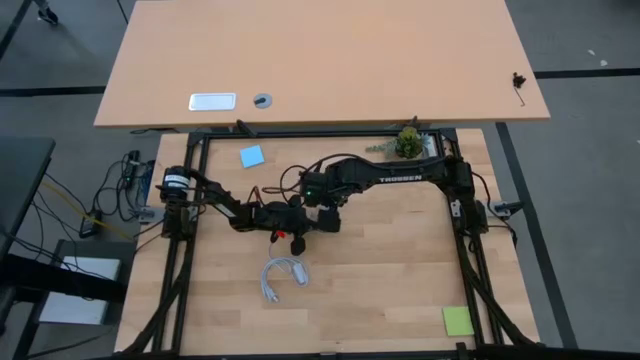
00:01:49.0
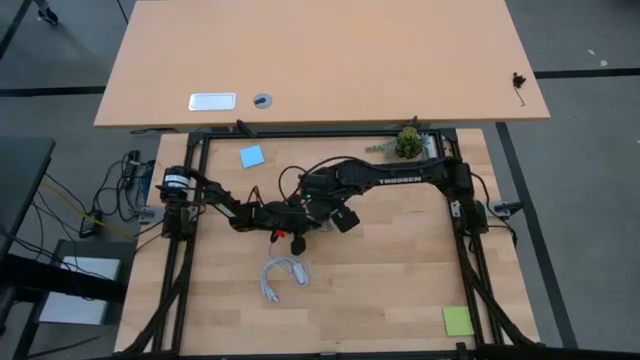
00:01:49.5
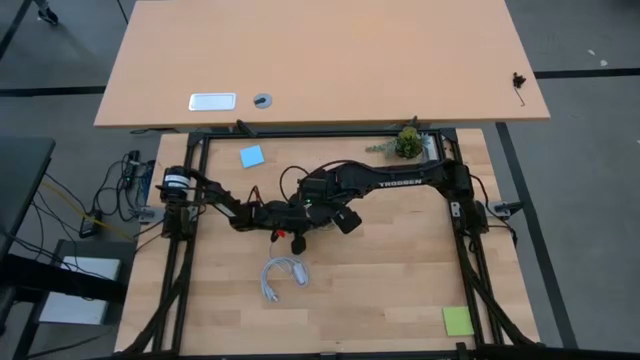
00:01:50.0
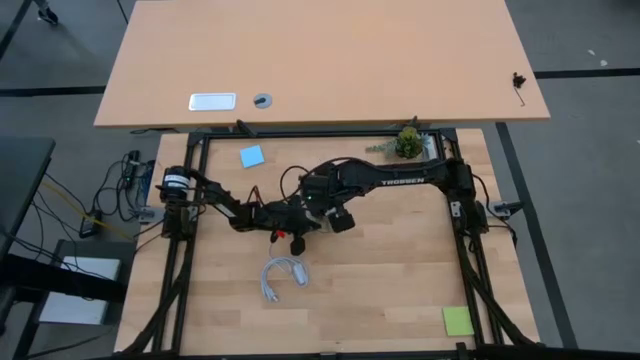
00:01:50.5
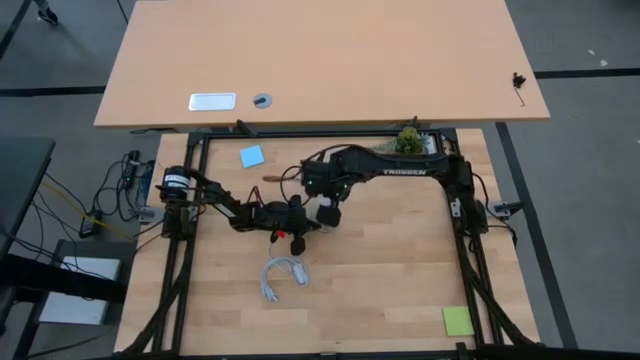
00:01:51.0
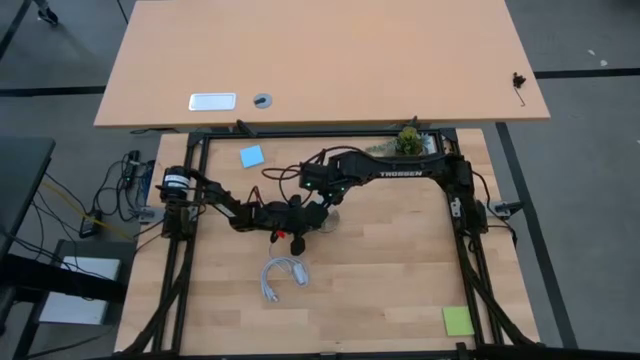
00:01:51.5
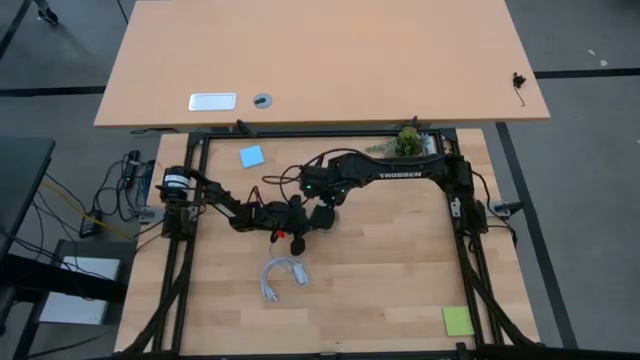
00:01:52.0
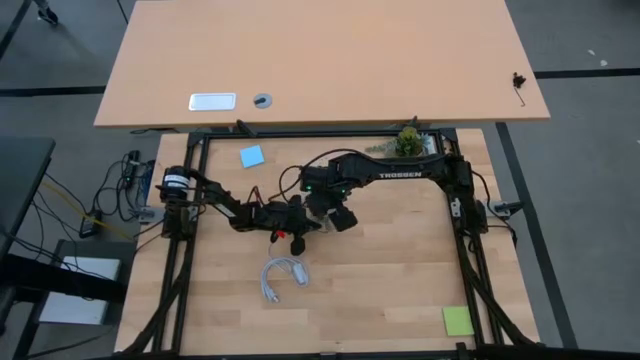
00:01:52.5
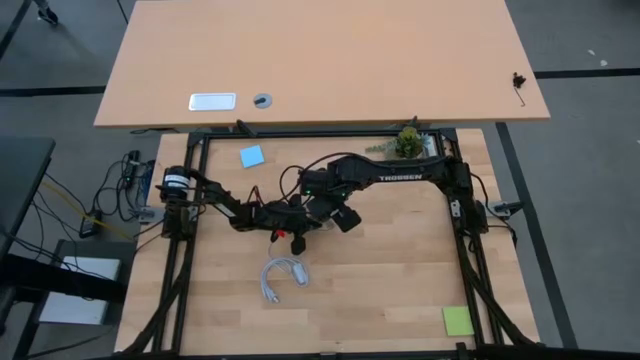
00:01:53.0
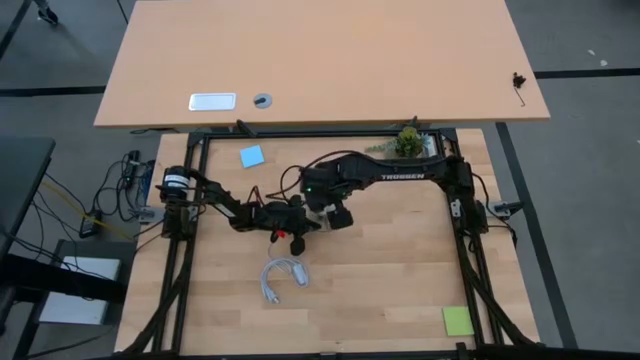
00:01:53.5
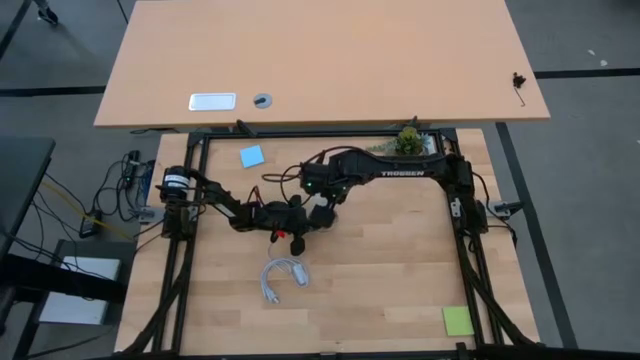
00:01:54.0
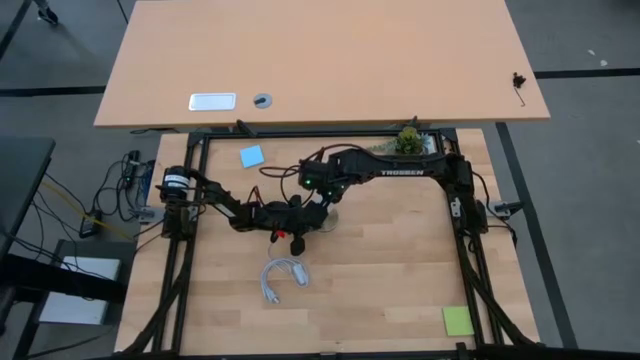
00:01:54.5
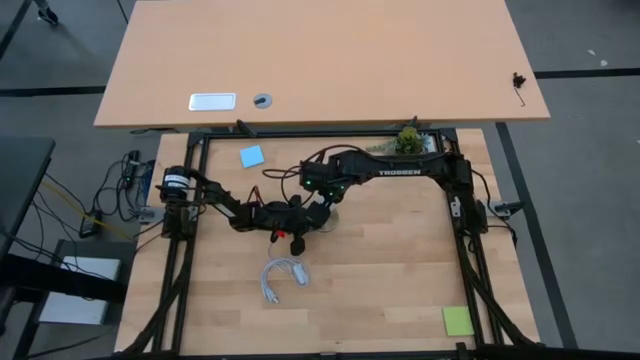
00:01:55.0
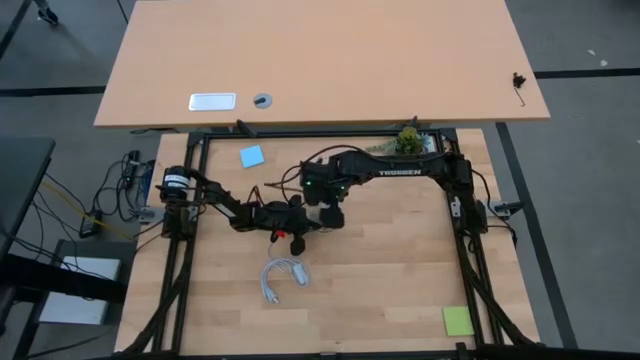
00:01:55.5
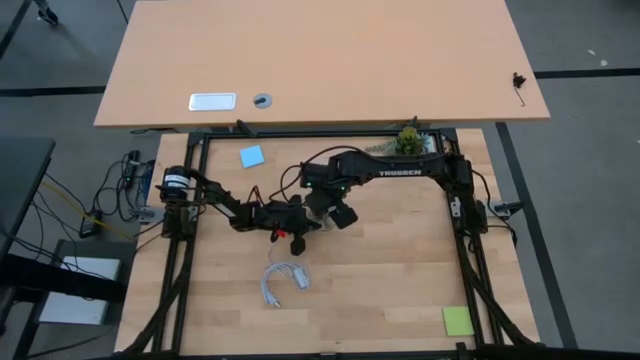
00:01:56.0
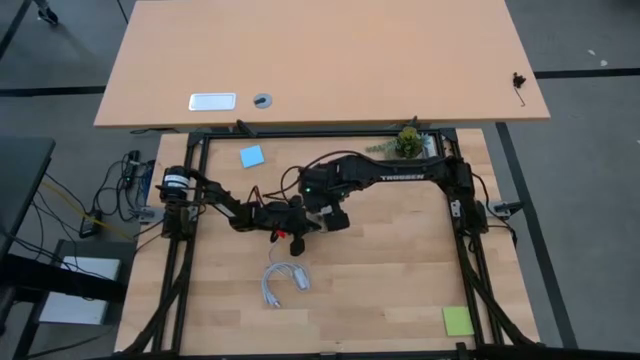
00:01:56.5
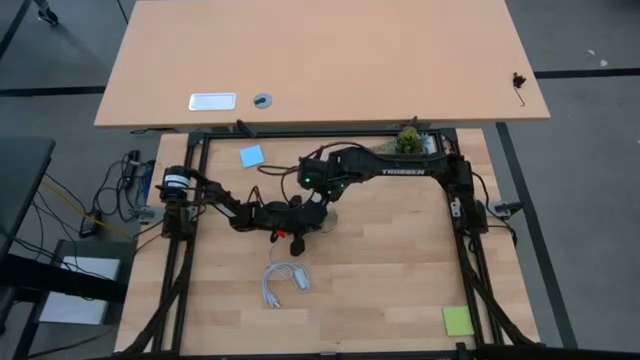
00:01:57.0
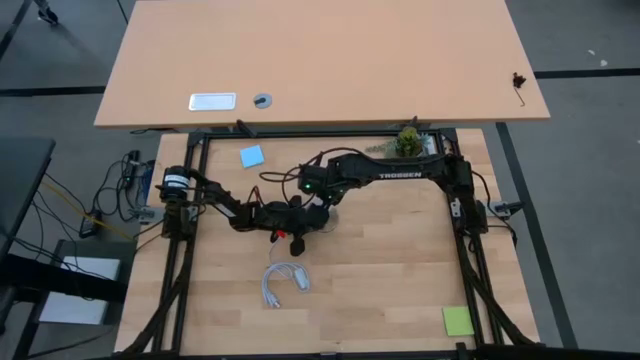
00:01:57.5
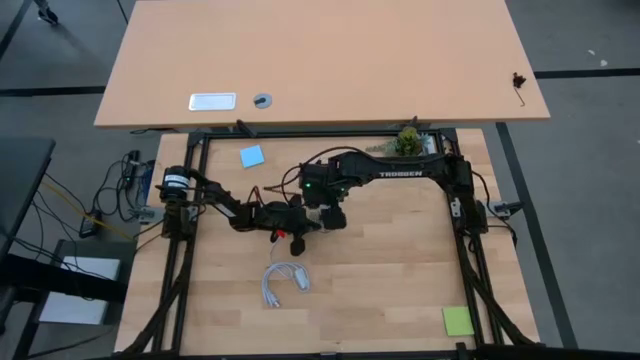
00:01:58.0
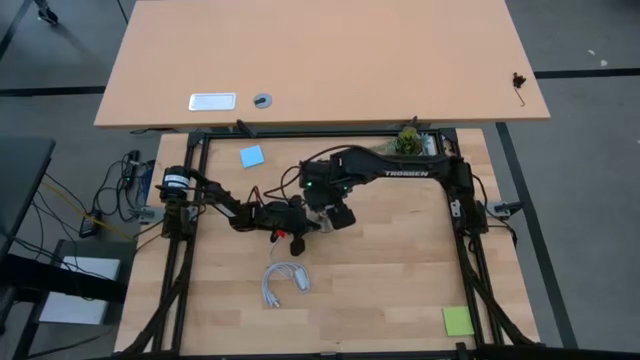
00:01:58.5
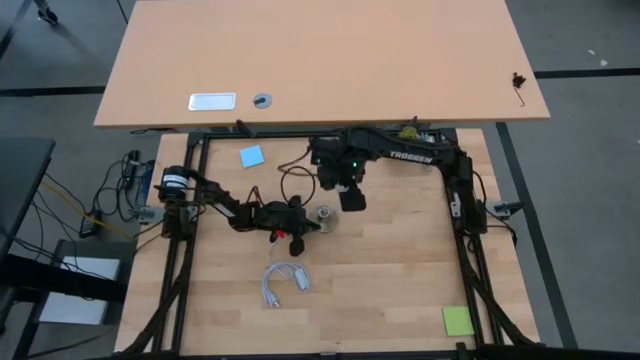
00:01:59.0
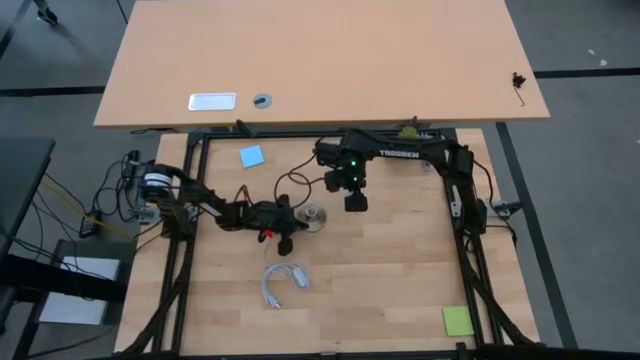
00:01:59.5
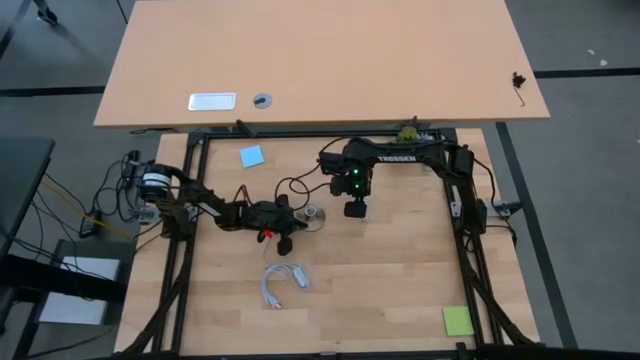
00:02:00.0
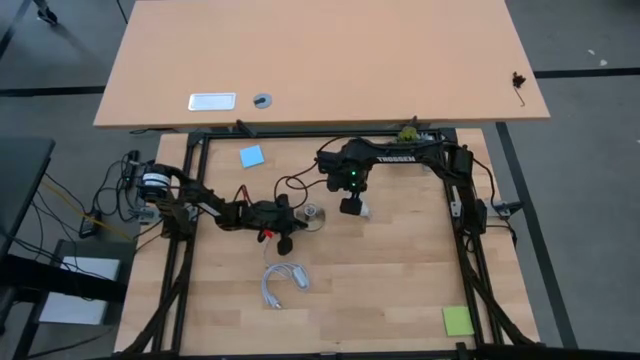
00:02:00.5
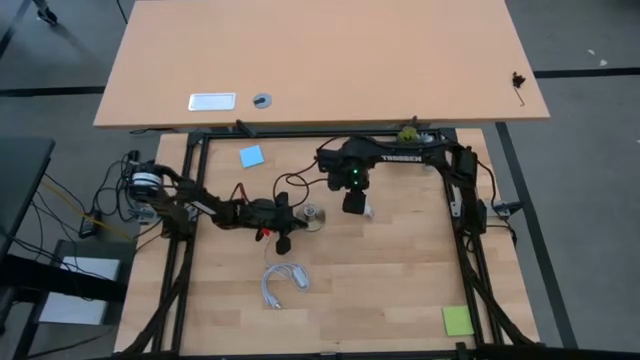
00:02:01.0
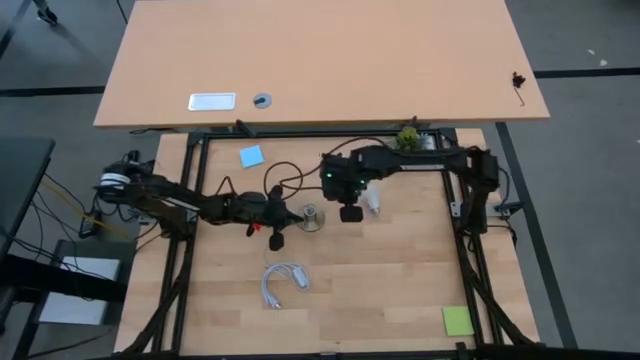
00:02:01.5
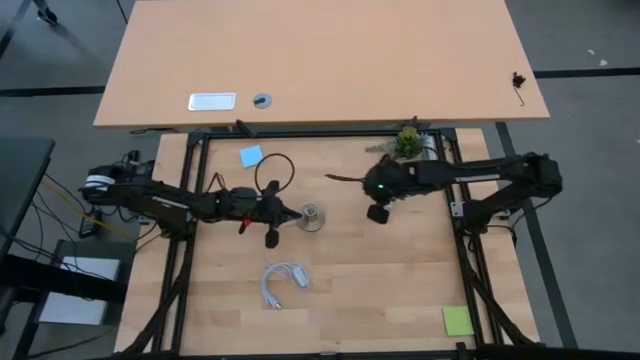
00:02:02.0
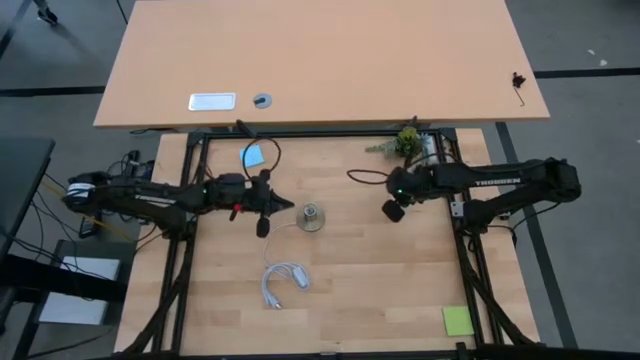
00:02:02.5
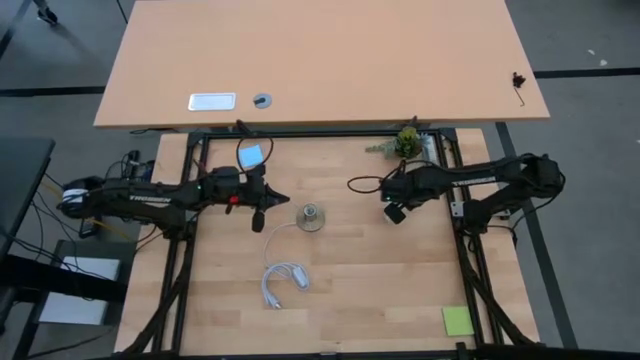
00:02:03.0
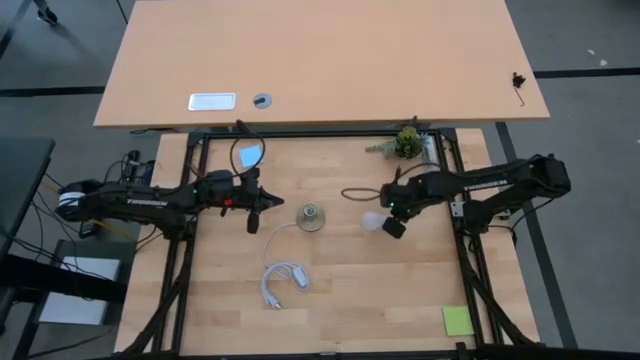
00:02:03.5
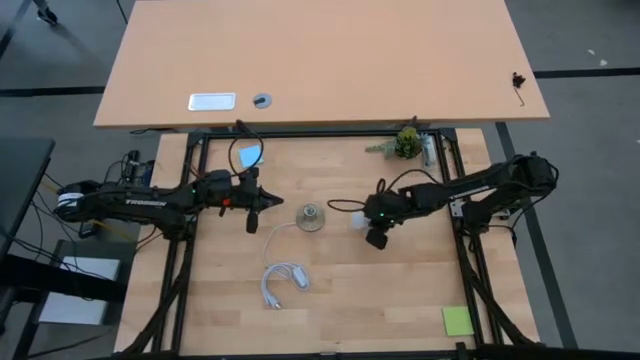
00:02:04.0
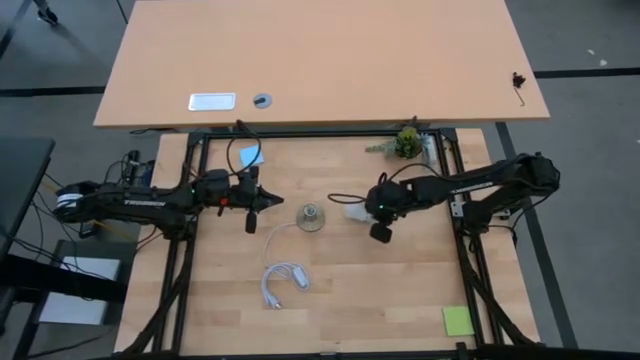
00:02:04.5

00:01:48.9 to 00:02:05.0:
Task: Screw lightbulb
Remove the light bulb from the lamp
